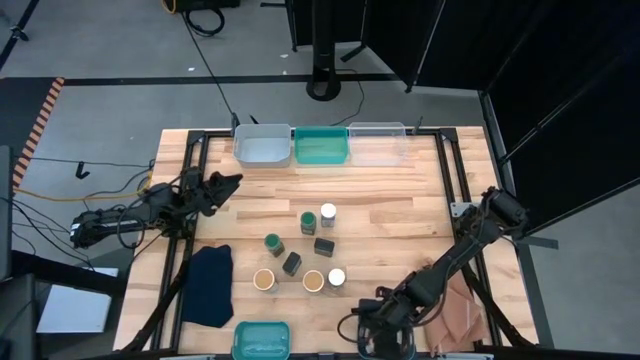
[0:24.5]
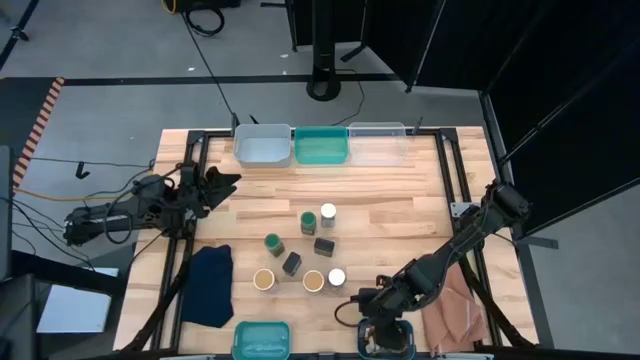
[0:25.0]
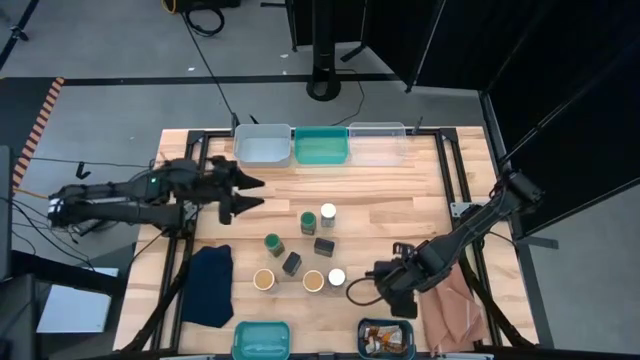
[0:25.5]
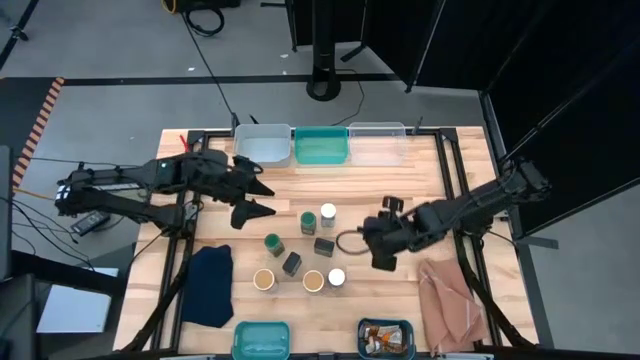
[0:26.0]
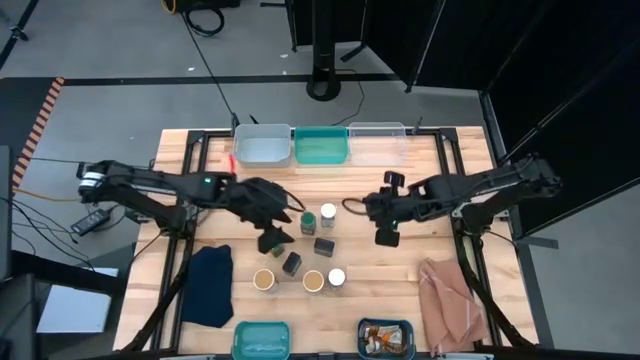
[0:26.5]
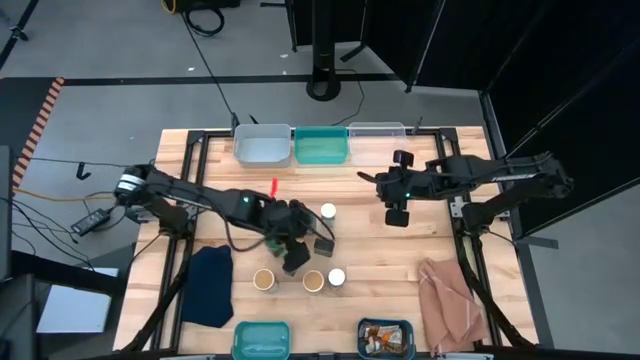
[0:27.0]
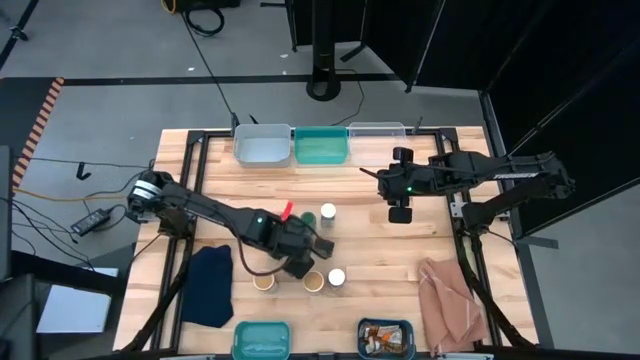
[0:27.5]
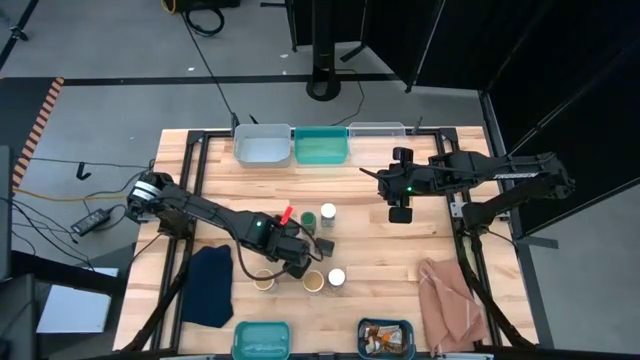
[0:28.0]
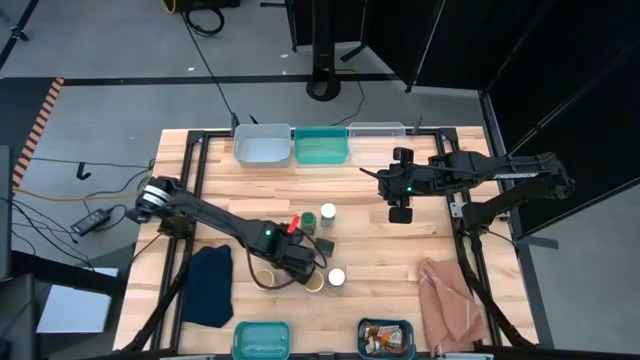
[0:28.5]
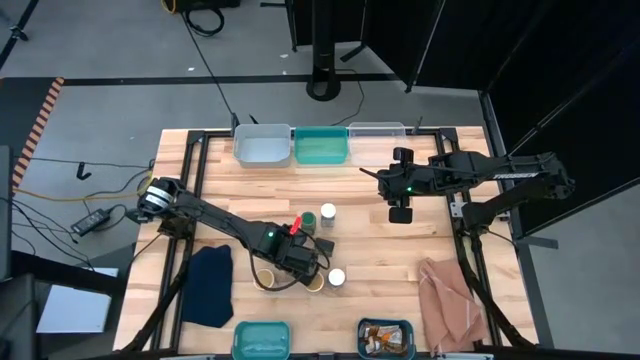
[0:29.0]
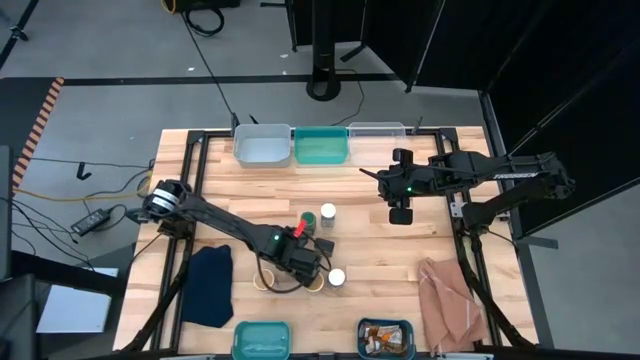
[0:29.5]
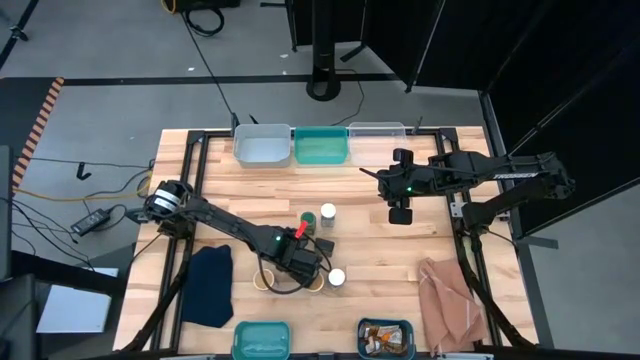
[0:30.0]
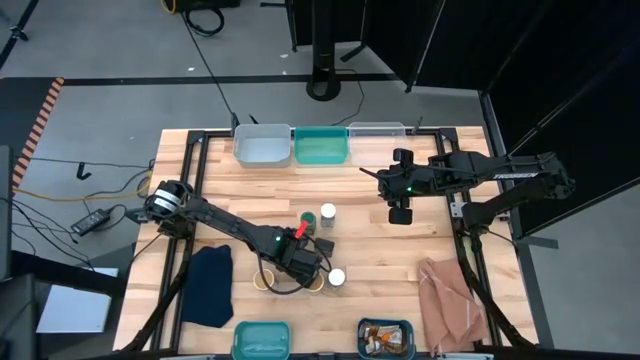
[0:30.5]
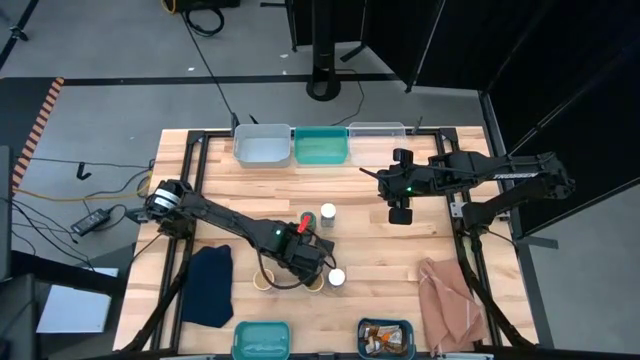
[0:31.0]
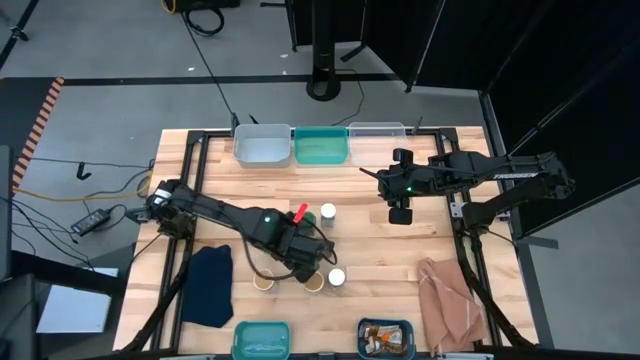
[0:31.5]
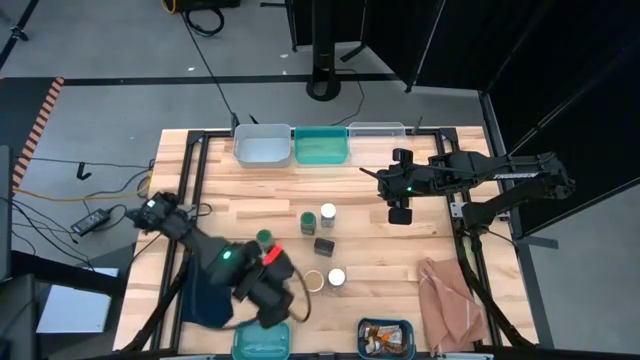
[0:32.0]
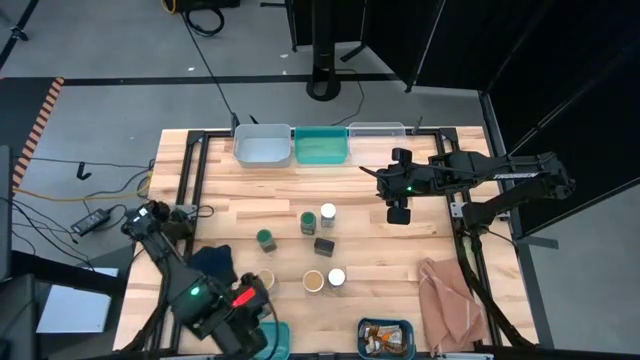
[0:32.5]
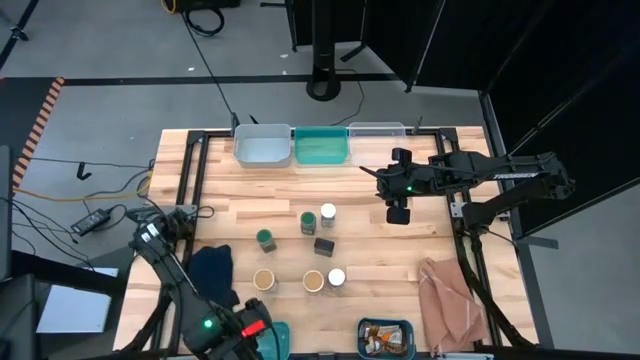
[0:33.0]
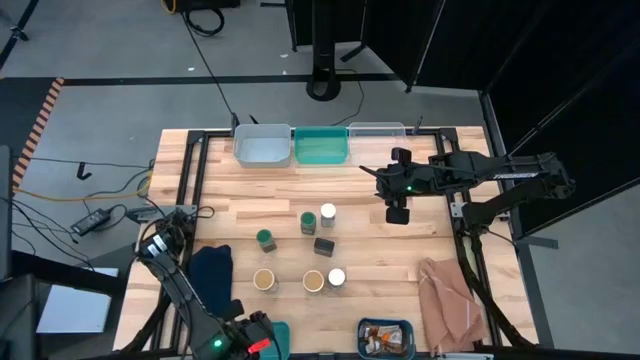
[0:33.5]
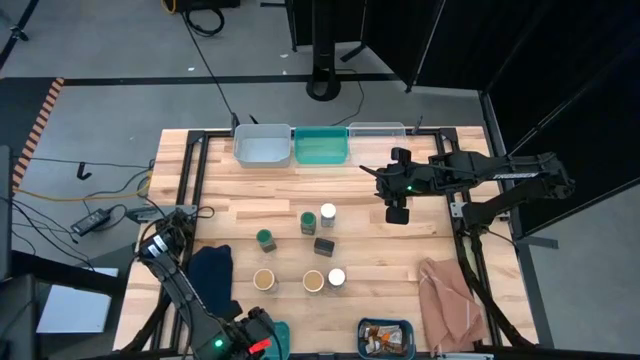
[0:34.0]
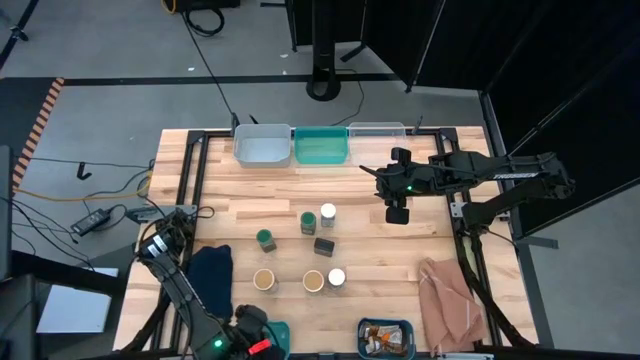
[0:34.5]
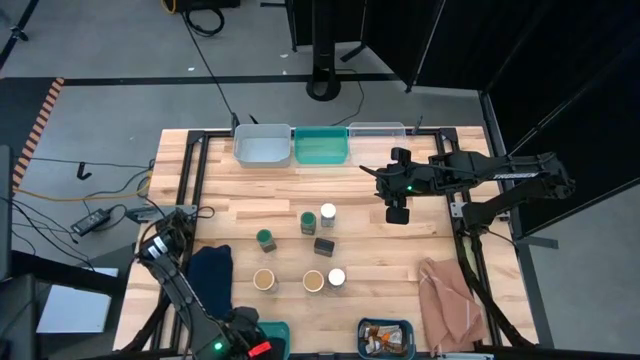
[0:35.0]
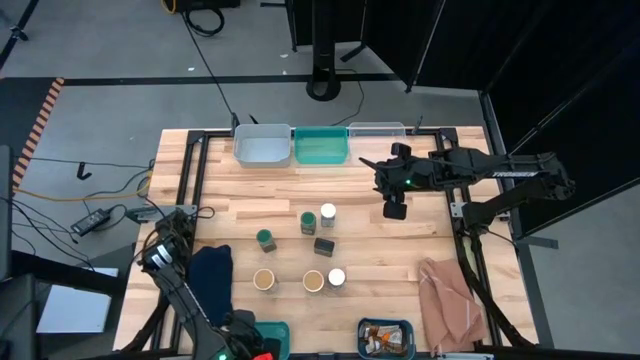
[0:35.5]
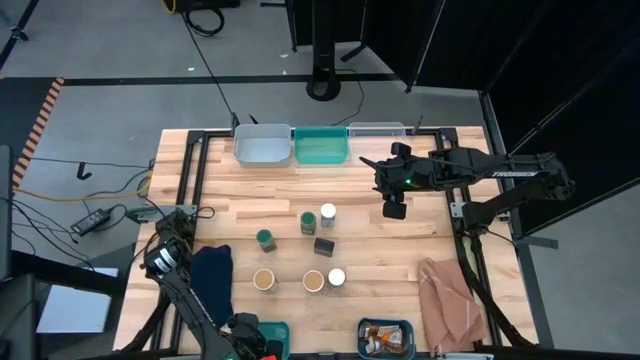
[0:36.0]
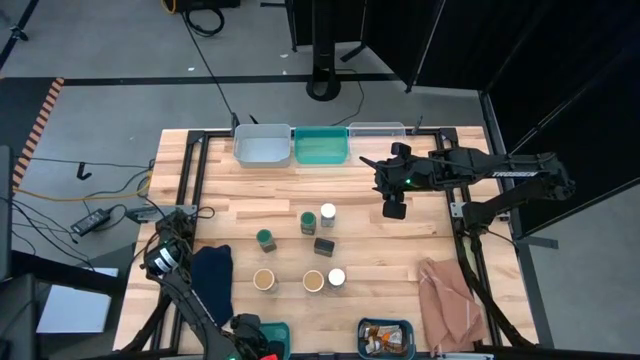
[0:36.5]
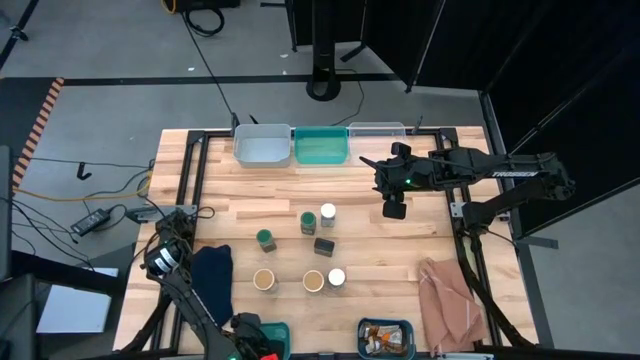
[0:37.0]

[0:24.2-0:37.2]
Task: Sort spices by type
Put the bottom black seasoning can into the dark green bin

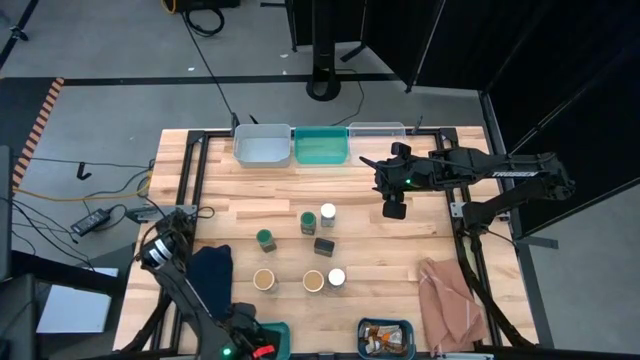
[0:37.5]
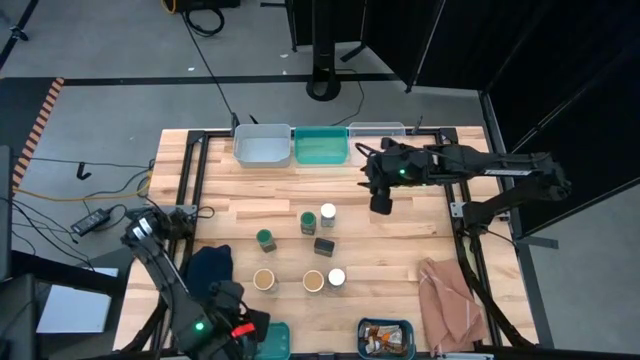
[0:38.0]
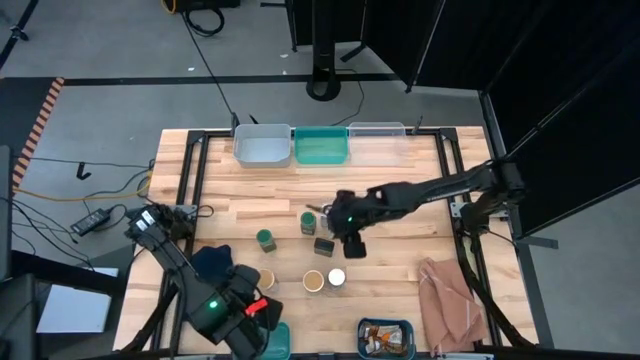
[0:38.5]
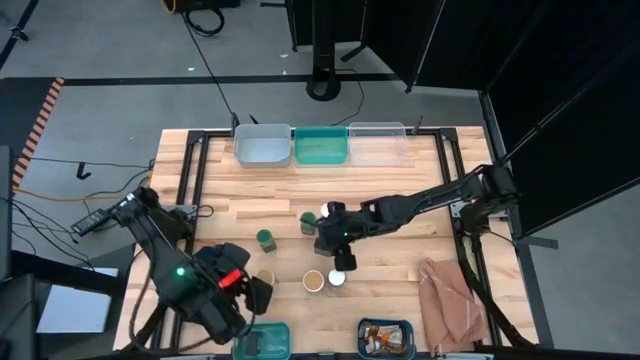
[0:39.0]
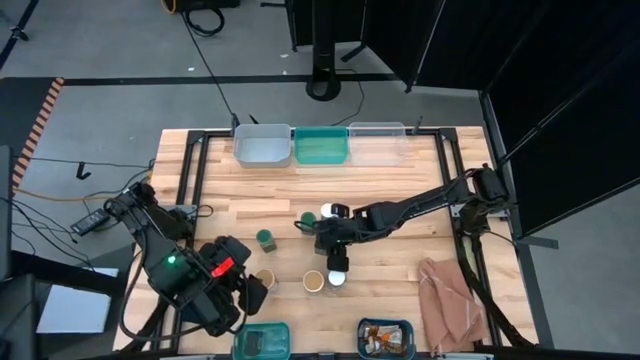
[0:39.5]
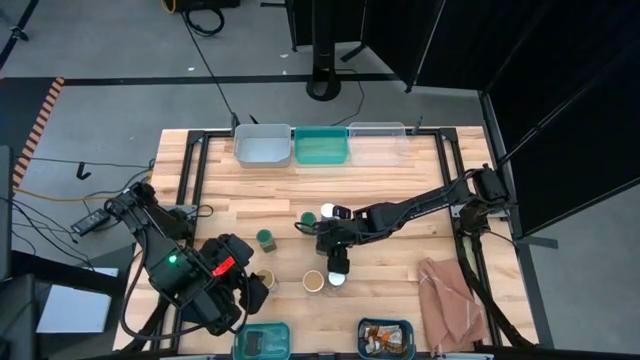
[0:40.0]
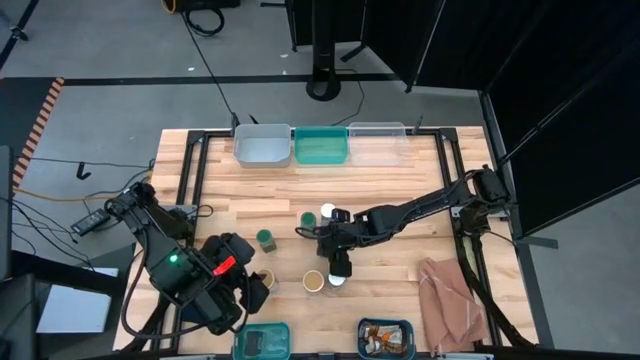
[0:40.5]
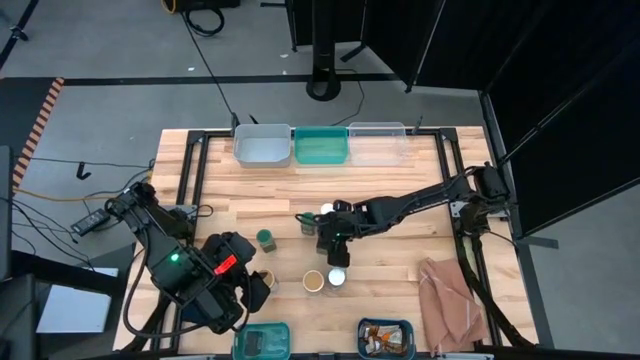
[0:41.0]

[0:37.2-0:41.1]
Put the black seasoning can into the dark green bin

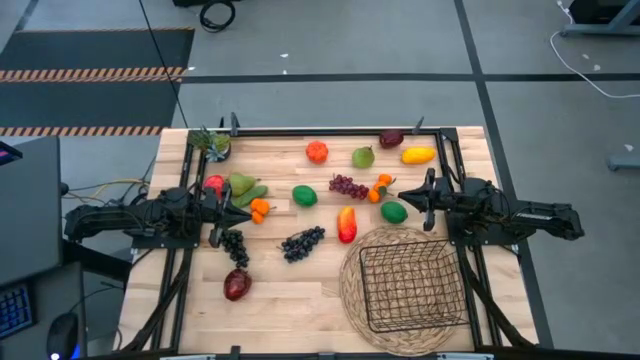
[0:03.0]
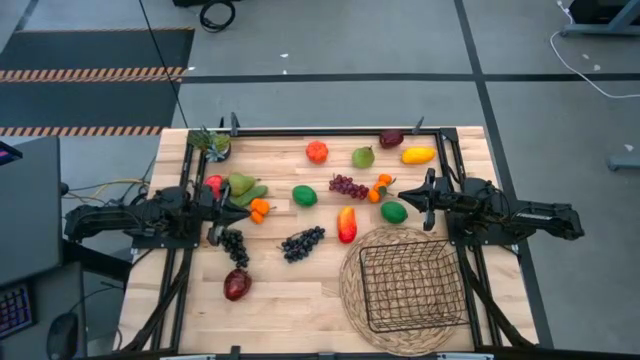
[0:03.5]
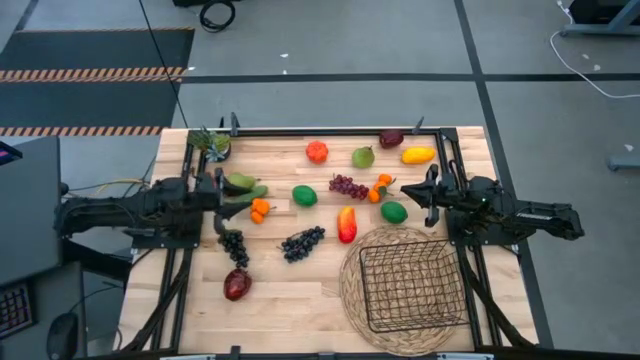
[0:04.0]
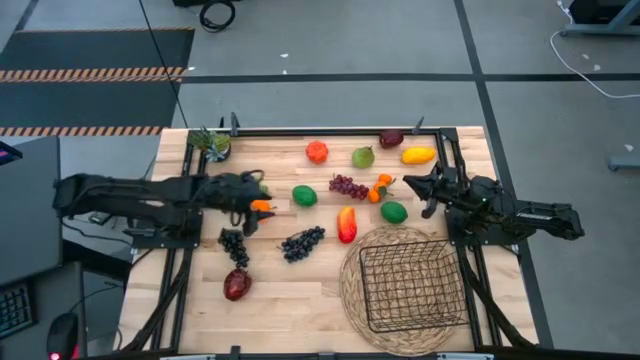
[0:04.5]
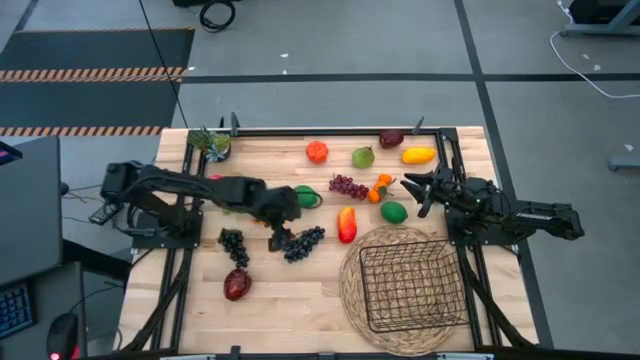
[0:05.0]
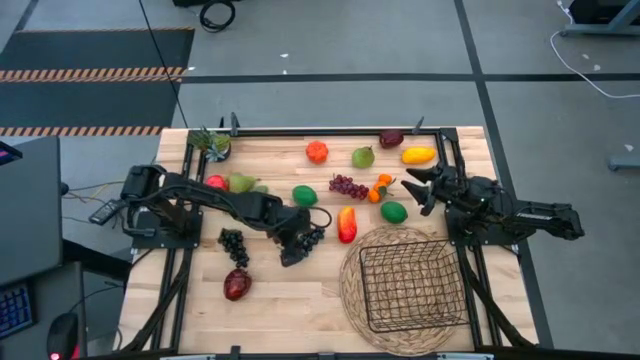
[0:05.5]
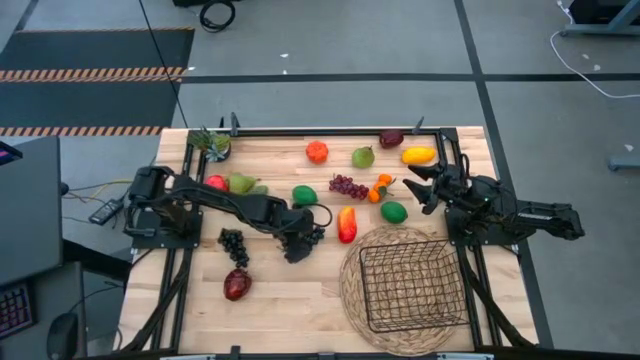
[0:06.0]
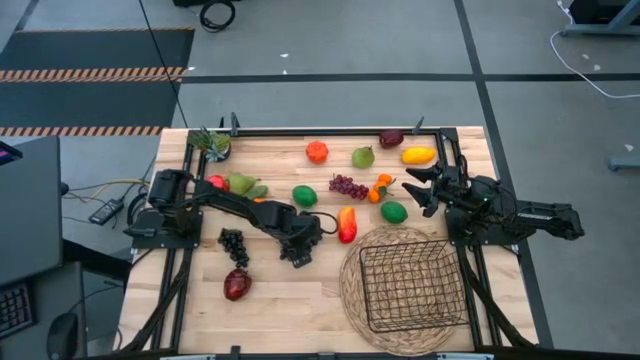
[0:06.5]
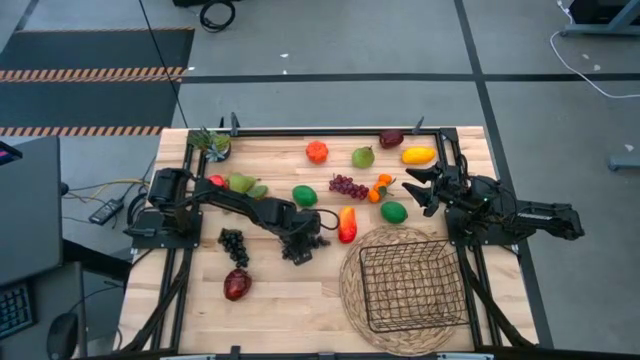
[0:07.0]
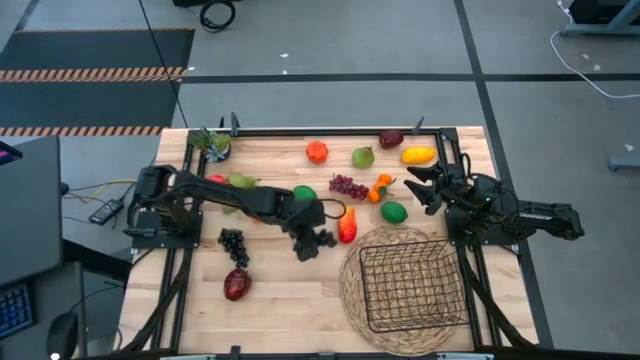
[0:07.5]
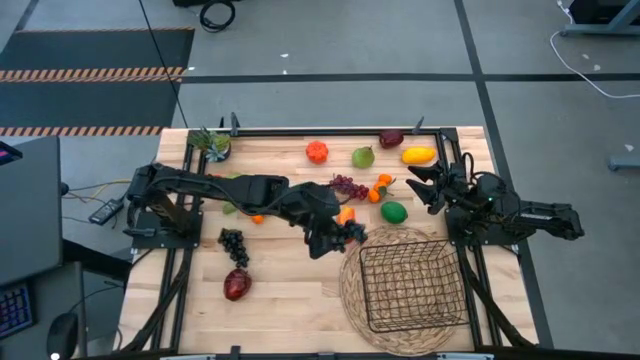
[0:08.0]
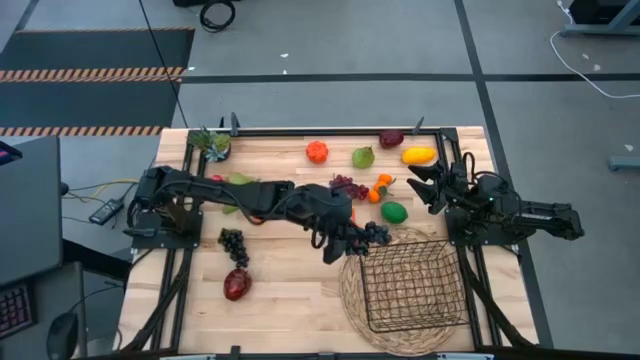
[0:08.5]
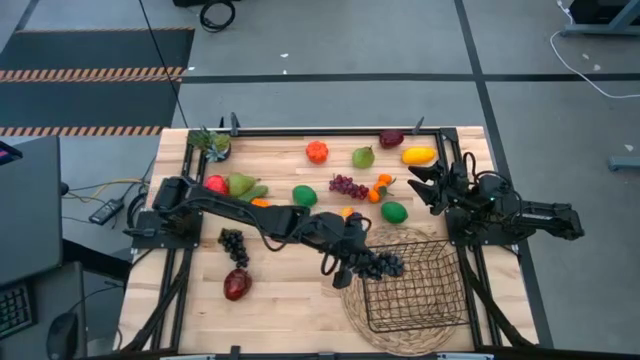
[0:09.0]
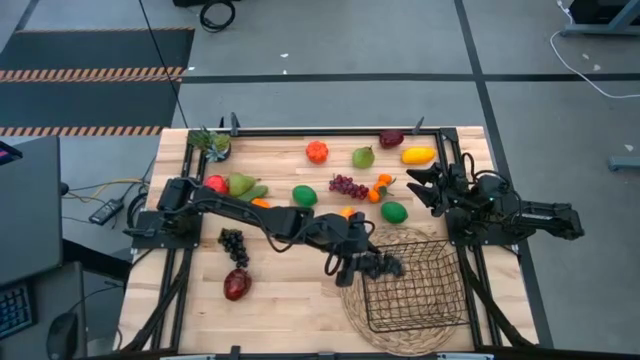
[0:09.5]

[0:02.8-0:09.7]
Task: Build produce basket
Put the right black grapes into the black wire basket
